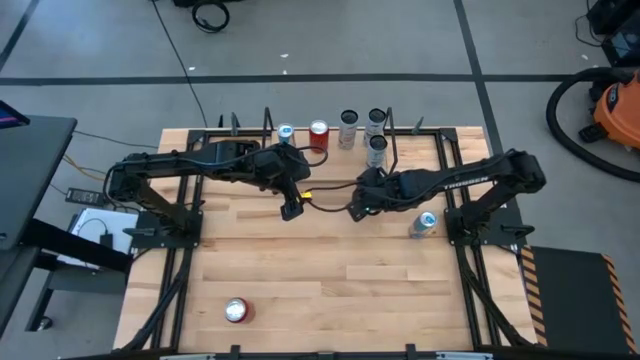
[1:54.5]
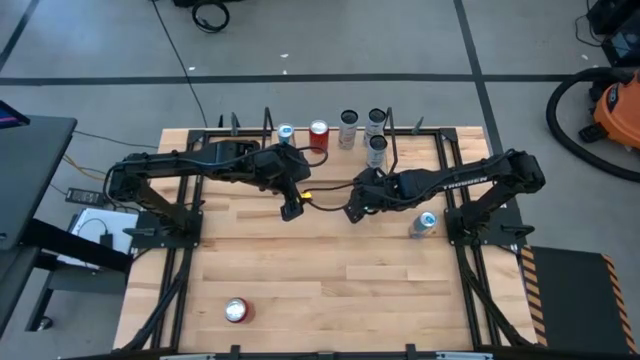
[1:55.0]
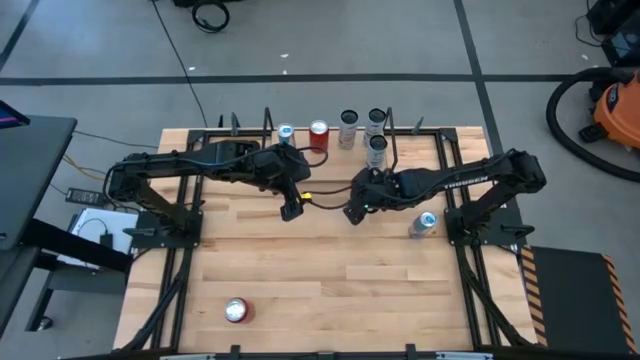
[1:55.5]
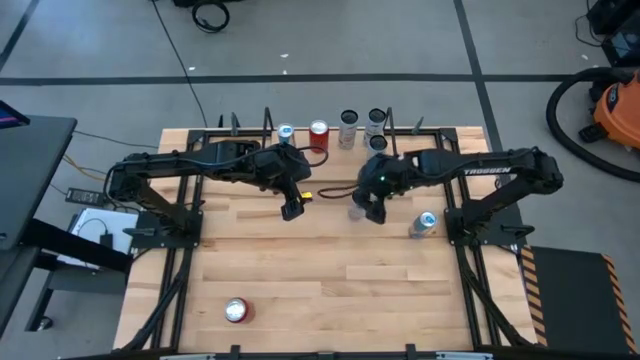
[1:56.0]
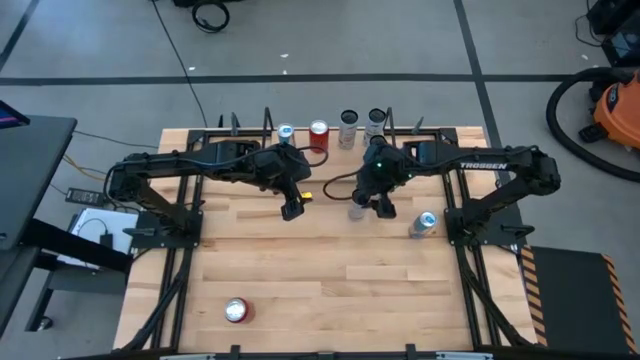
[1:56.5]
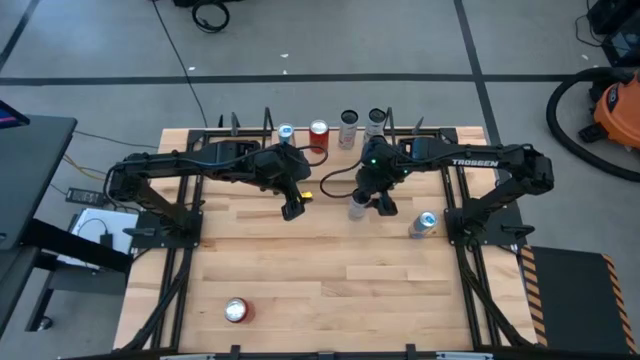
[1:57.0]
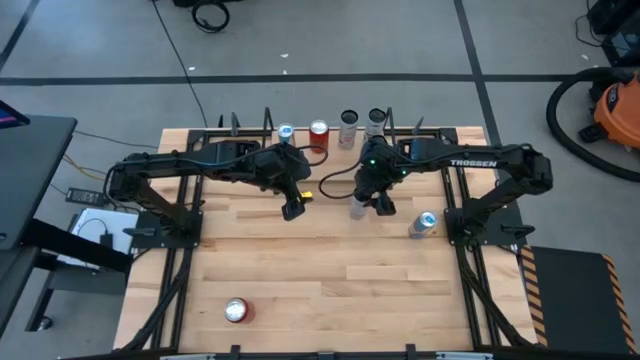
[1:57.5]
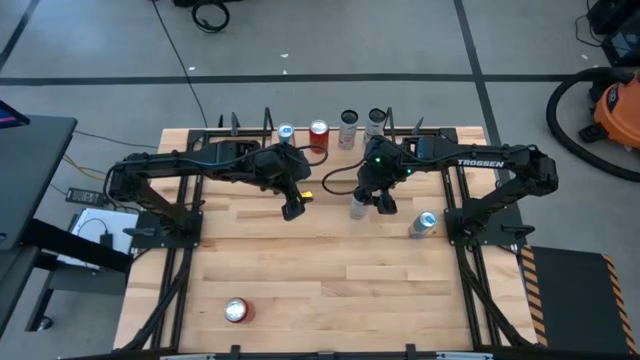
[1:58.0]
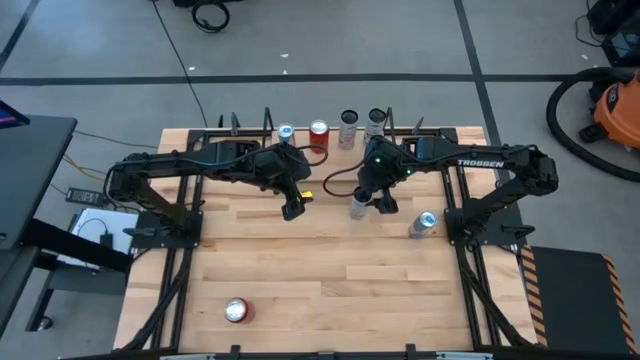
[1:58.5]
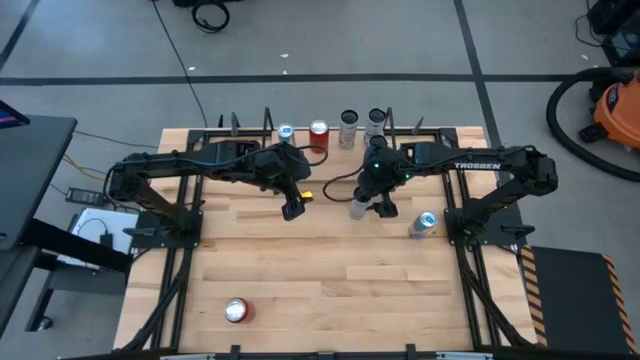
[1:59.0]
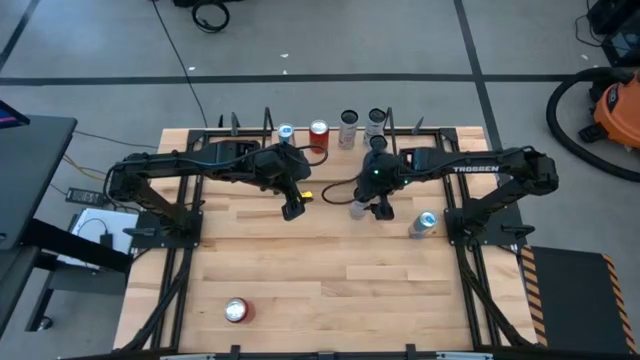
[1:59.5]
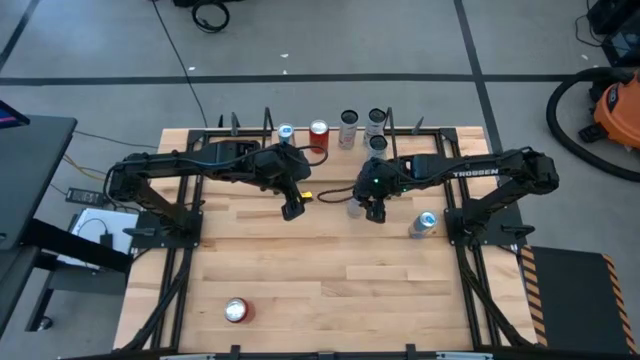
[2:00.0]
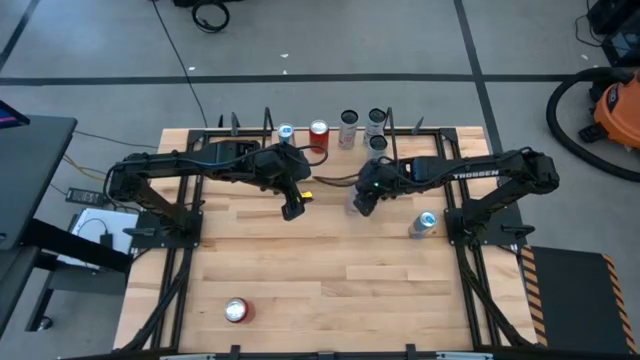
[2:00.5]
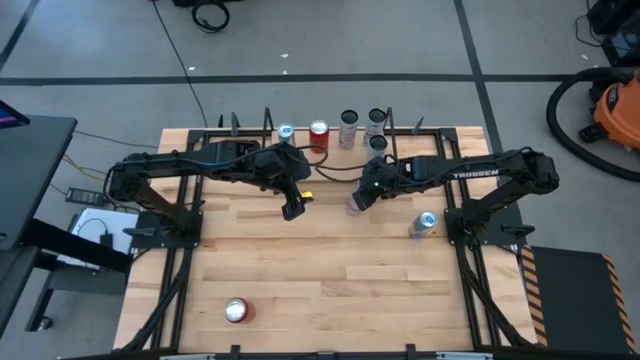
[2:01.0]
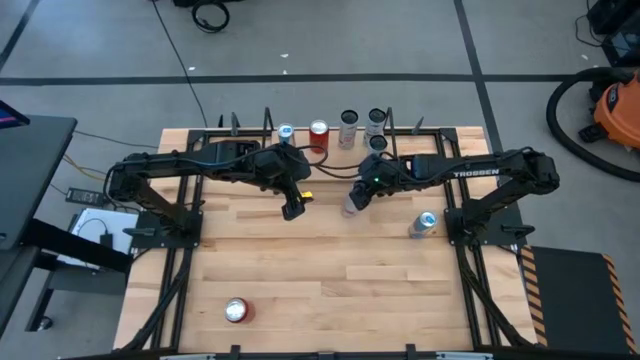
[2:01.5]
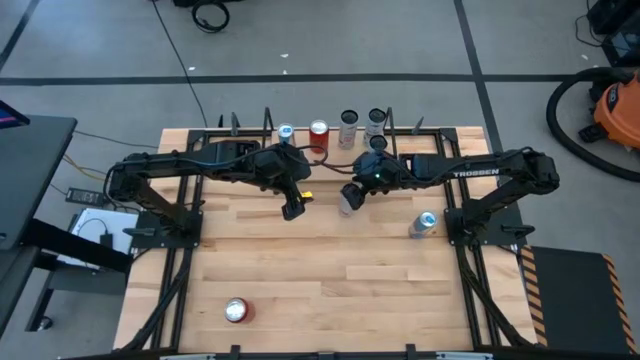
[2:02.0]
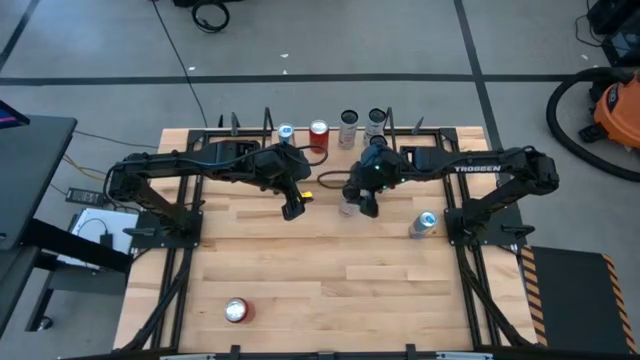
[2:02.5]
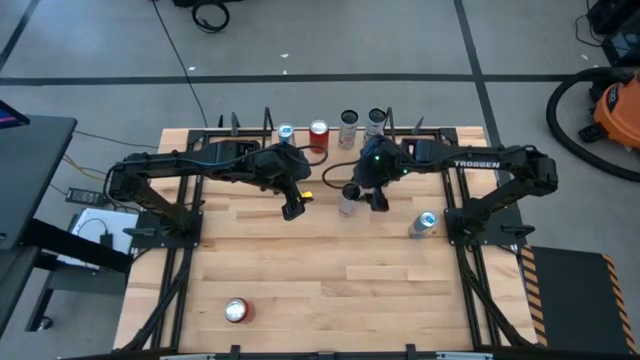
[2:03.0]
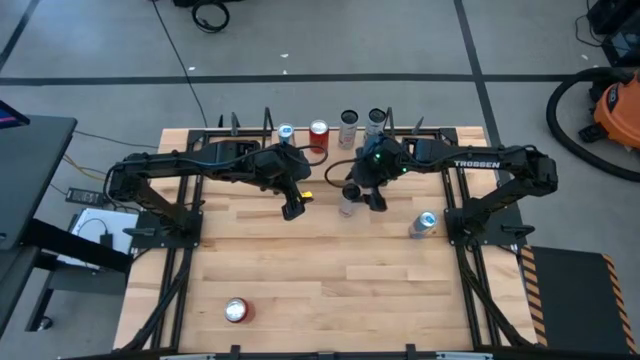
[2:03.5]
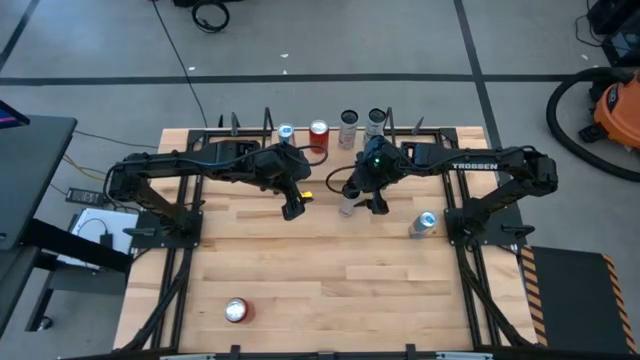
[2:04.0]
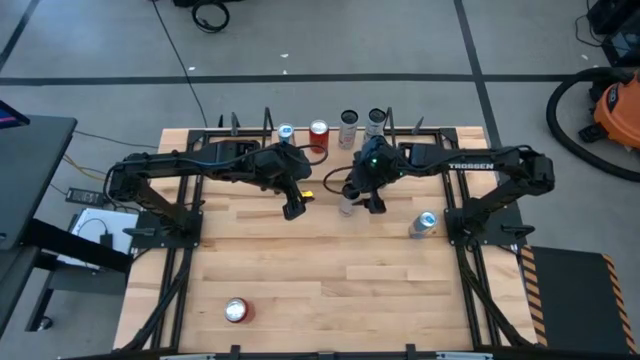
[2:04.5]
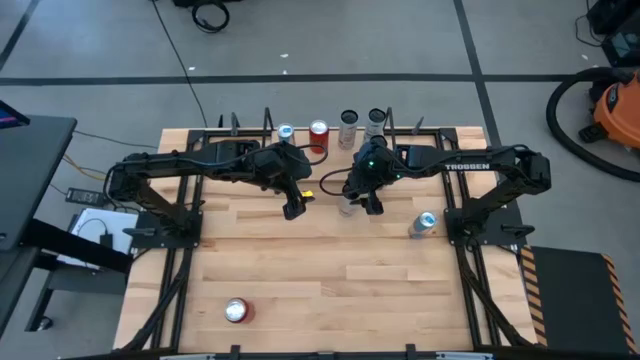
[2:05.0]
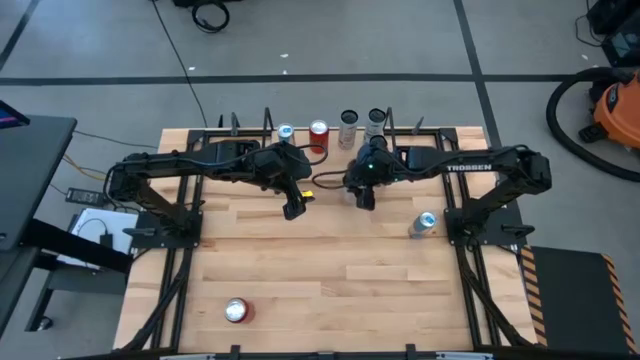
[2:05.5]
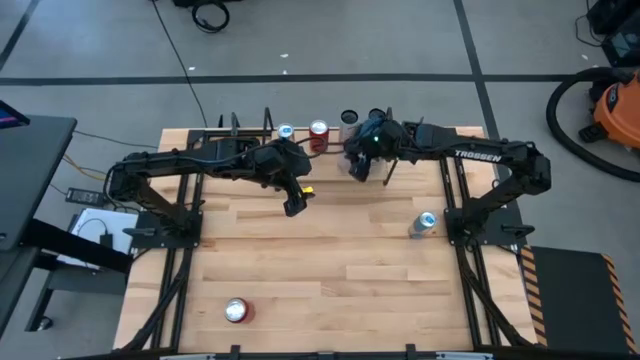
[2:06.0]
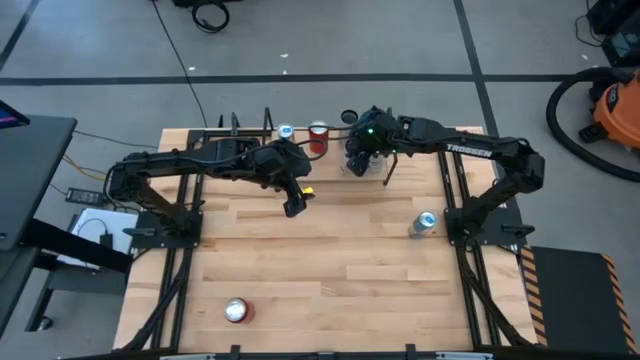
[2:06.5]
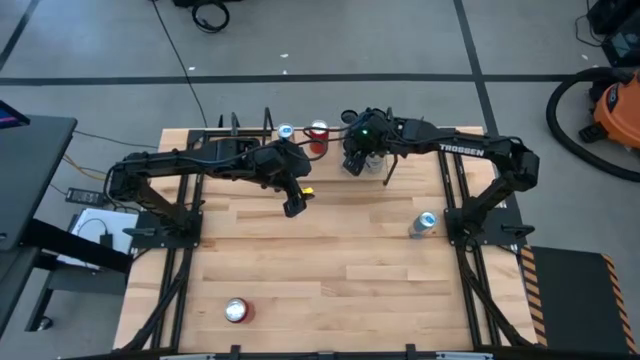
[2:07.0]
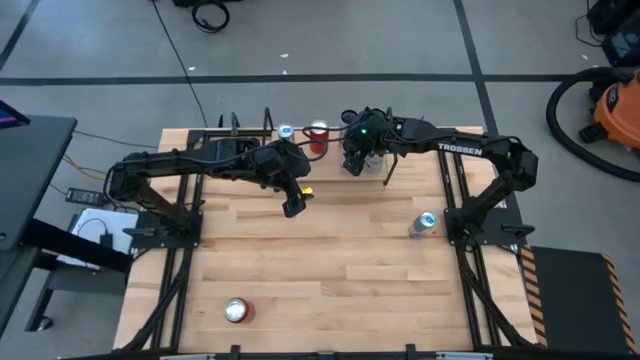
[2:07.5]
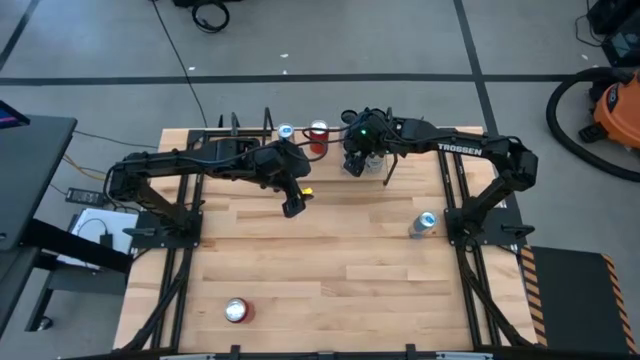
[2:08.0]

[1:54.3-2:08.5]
Task: Place canned beverage on shelf
Put the white-pink soda can on the shelf aligned with the other white-pink soda can

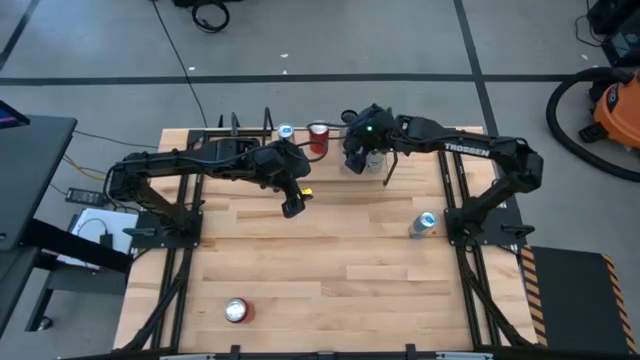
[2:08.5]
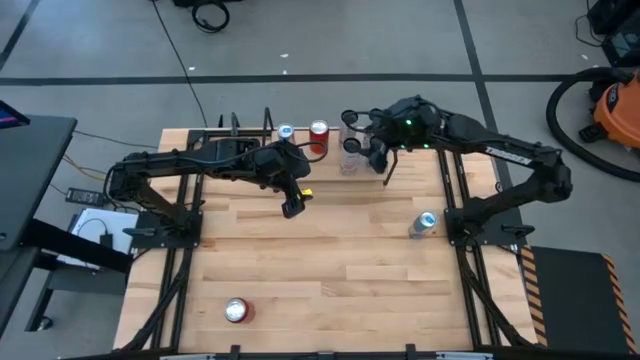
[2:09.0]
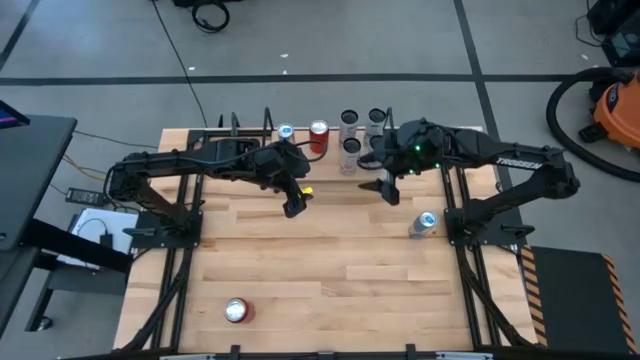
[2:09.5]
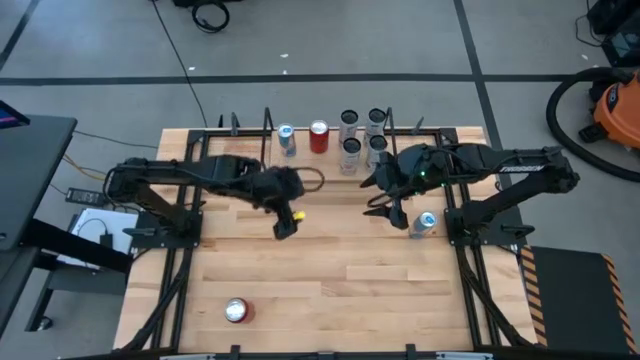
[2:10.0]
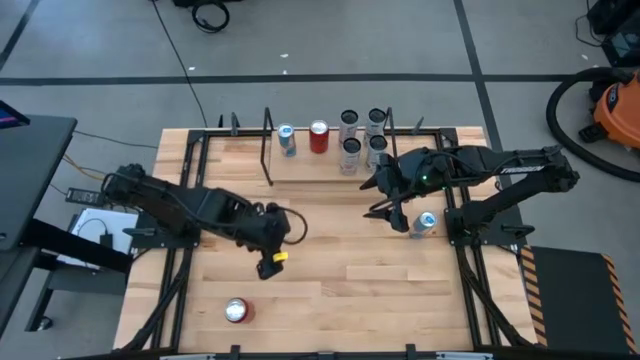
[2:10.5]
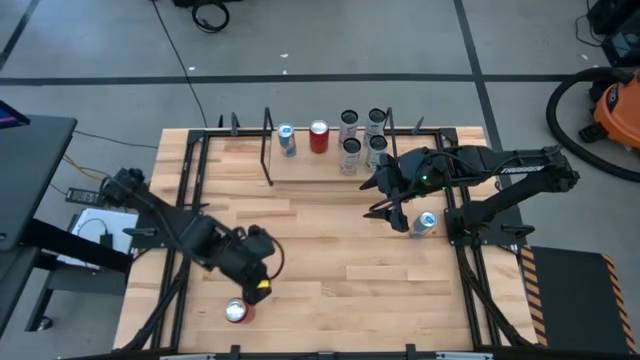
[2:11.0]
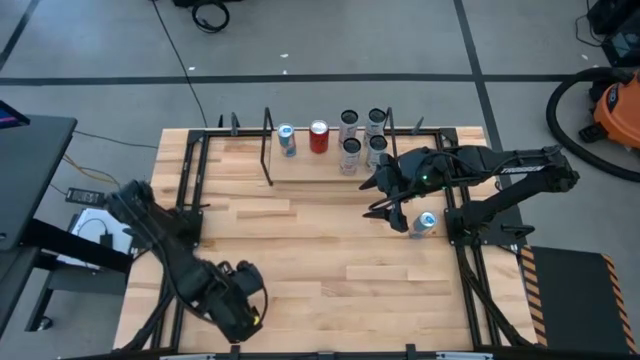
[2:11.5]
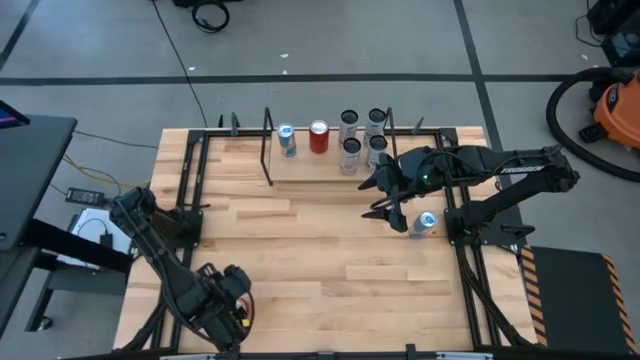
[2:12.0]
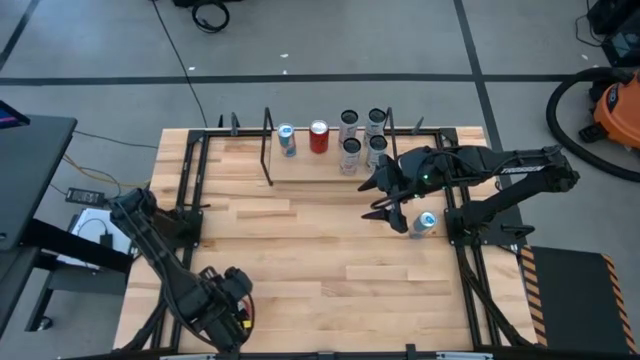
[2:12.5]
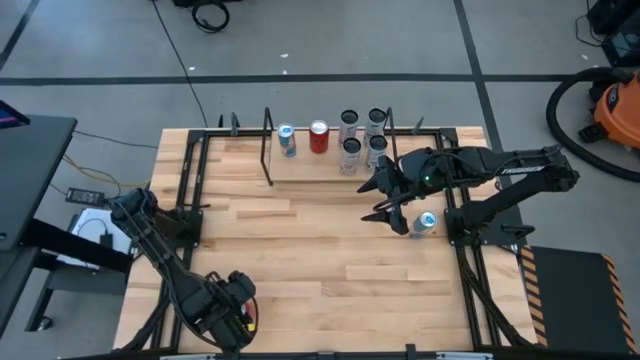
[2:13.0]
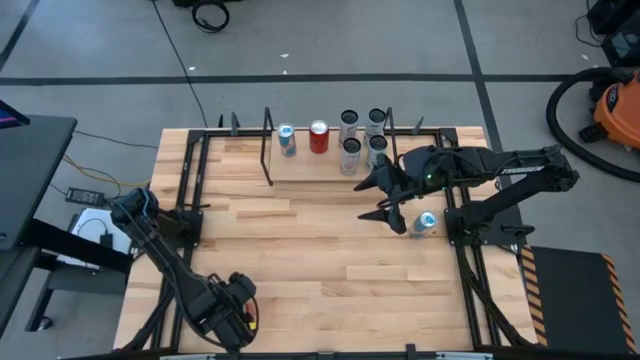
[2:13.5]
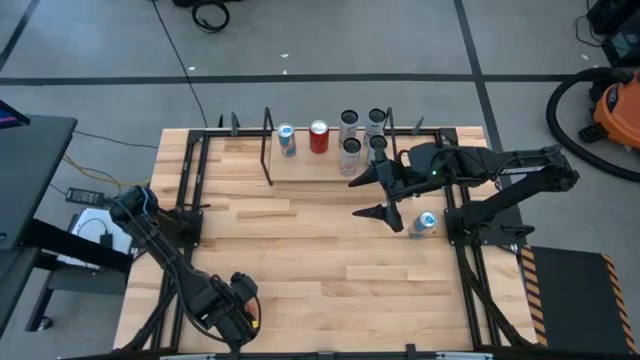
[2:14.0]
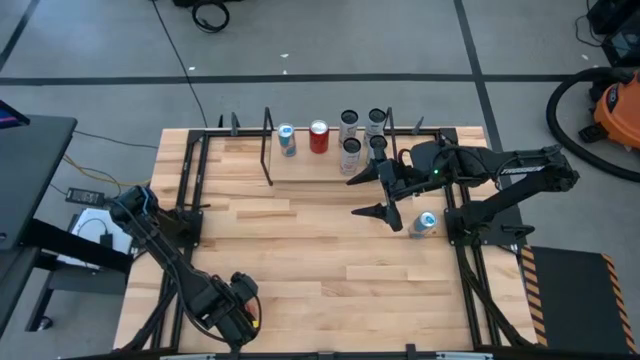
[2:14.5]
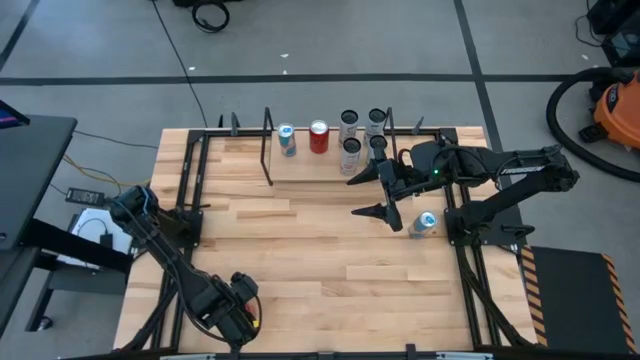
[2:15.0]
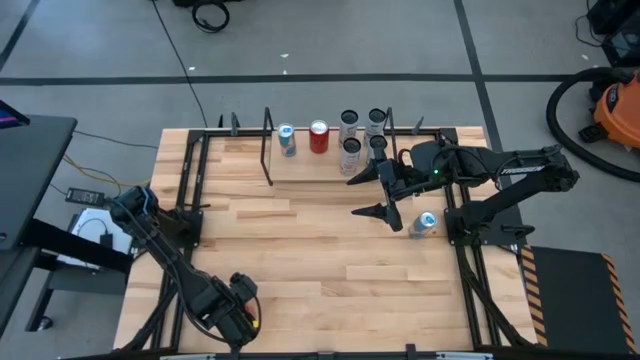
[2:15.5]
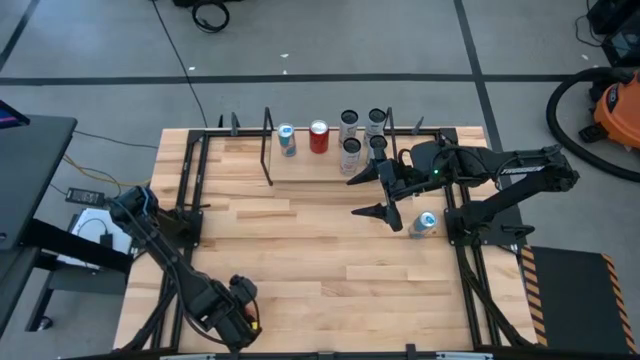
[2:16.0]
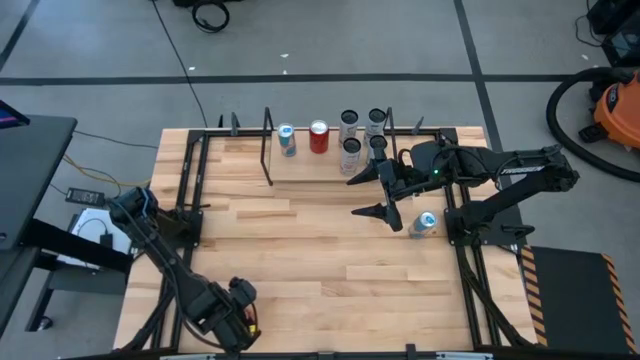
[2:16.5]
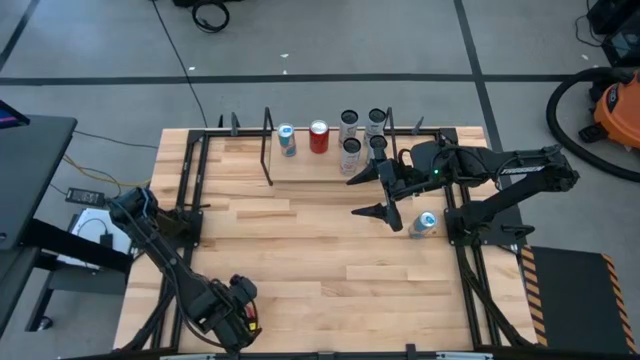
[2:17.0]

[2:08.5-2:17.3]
Put the red-black soda can on the shelf aligned with the other red-black soda can
